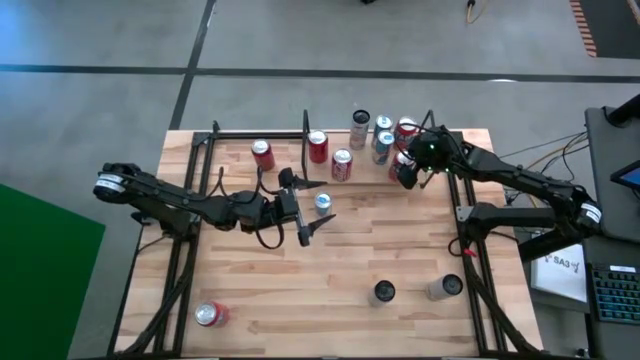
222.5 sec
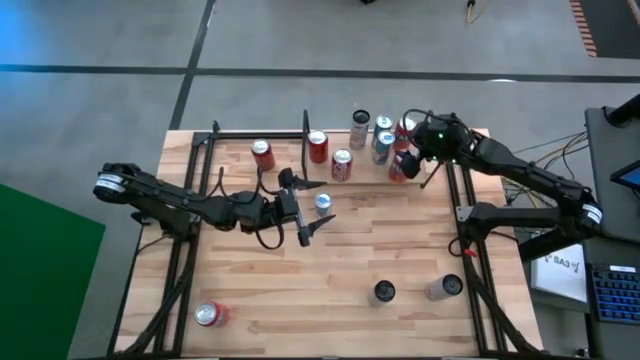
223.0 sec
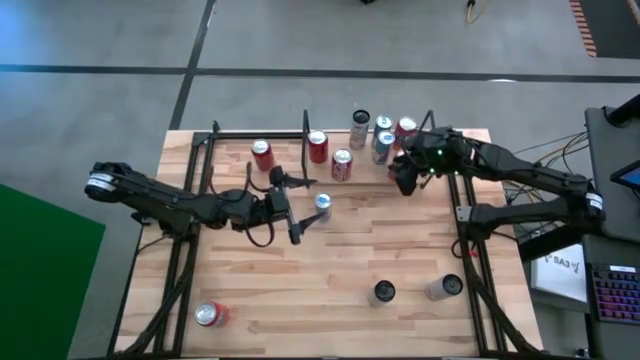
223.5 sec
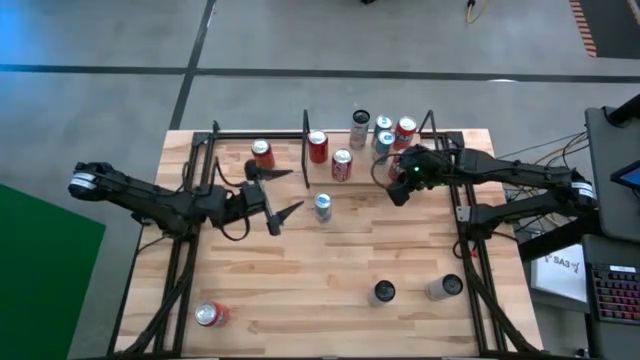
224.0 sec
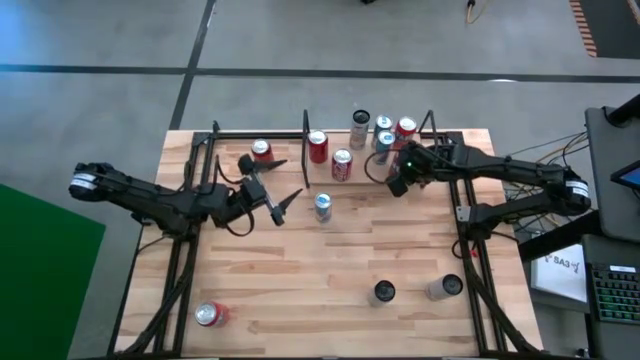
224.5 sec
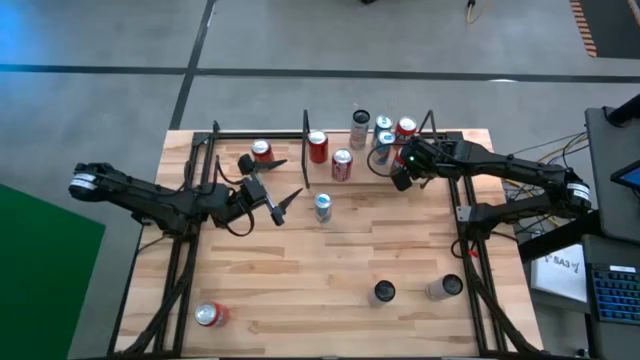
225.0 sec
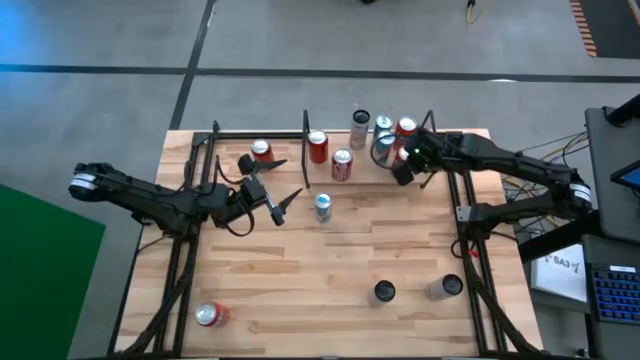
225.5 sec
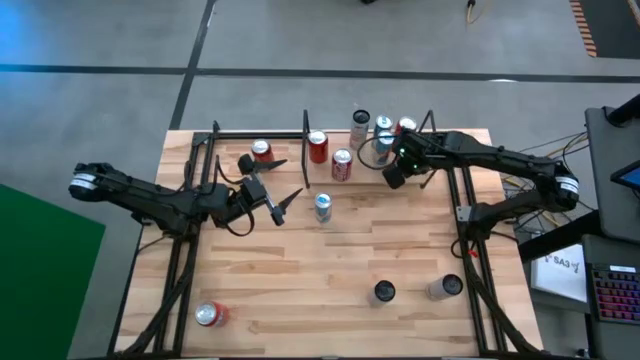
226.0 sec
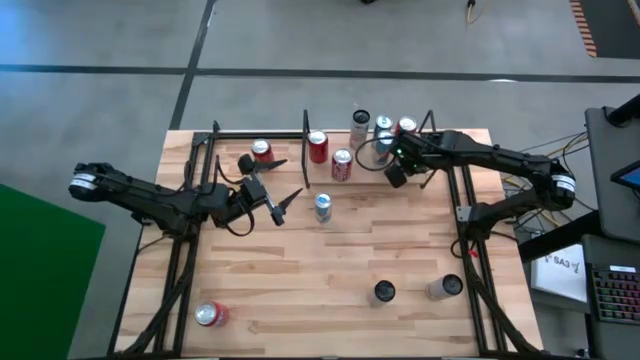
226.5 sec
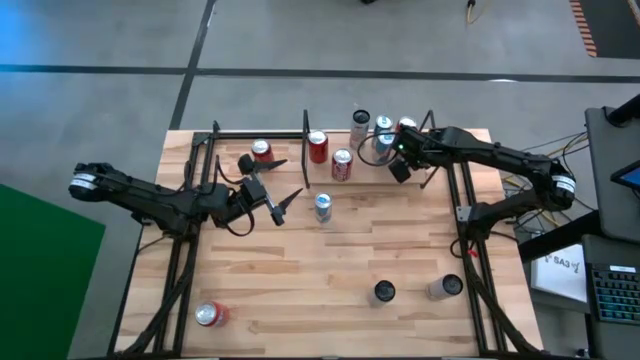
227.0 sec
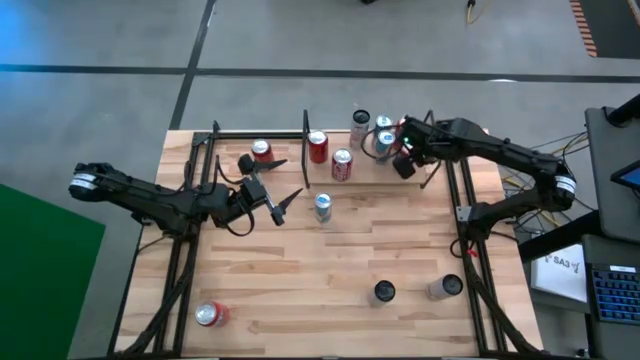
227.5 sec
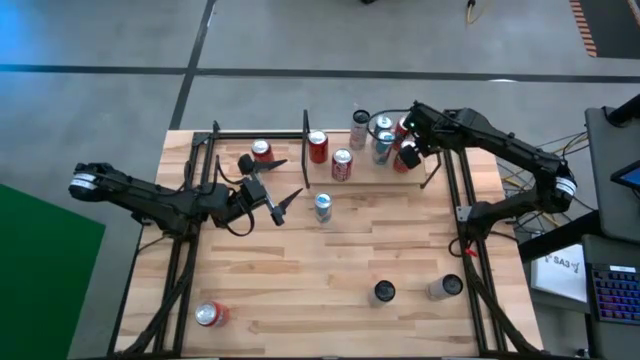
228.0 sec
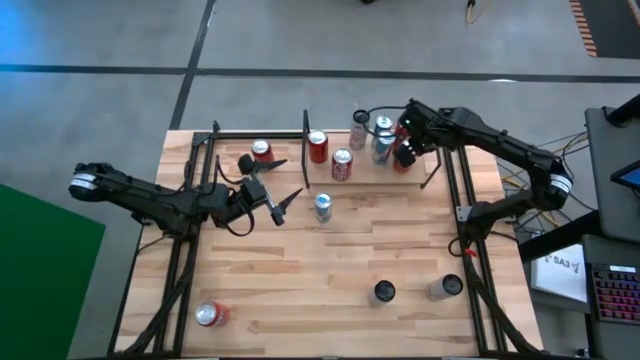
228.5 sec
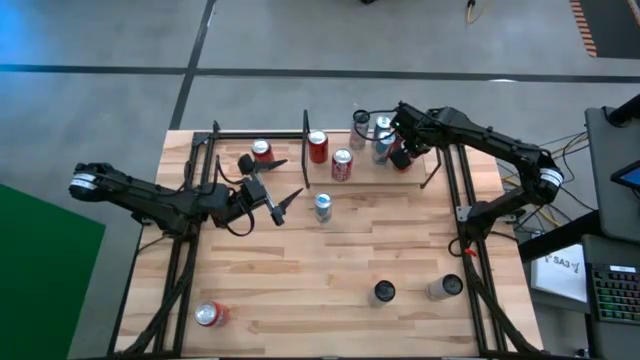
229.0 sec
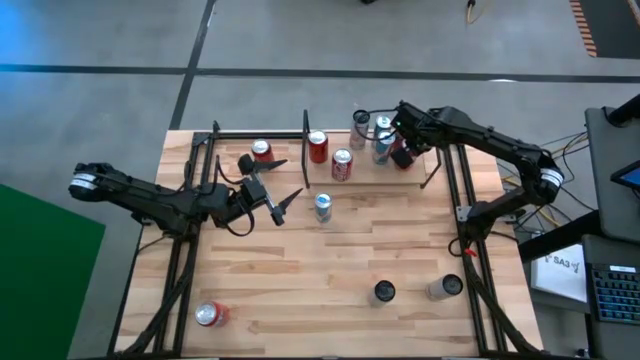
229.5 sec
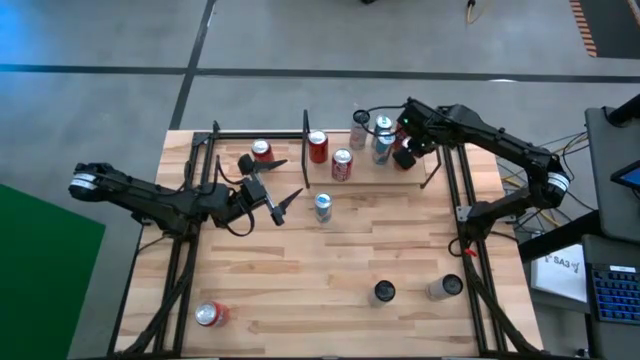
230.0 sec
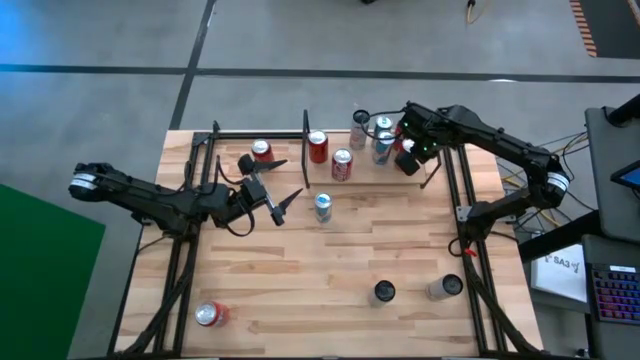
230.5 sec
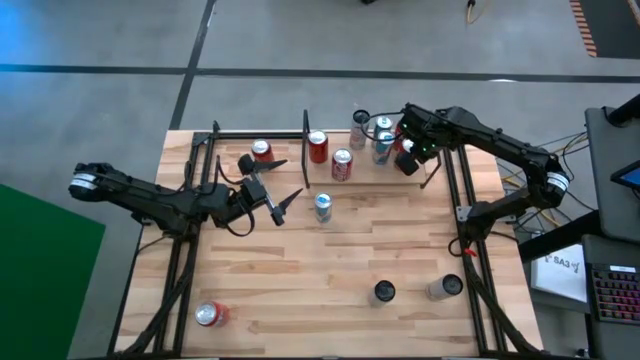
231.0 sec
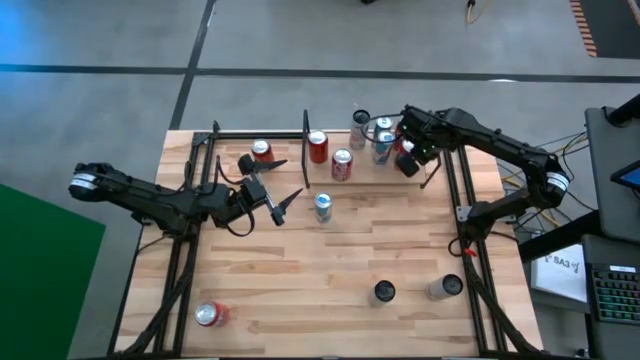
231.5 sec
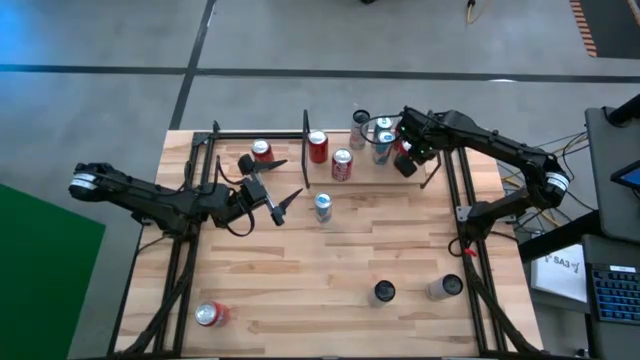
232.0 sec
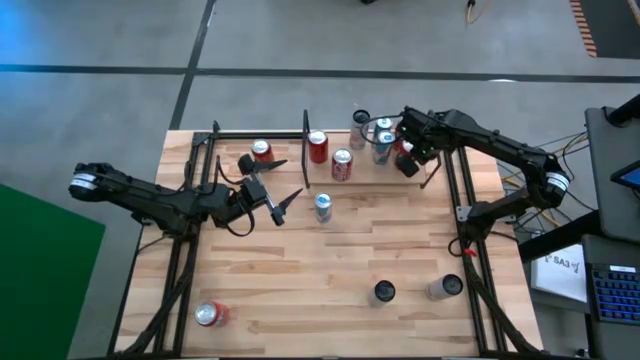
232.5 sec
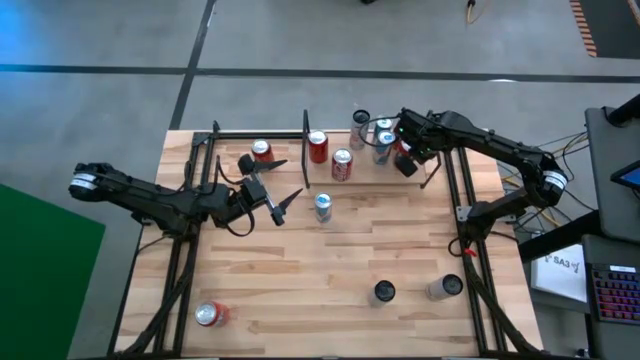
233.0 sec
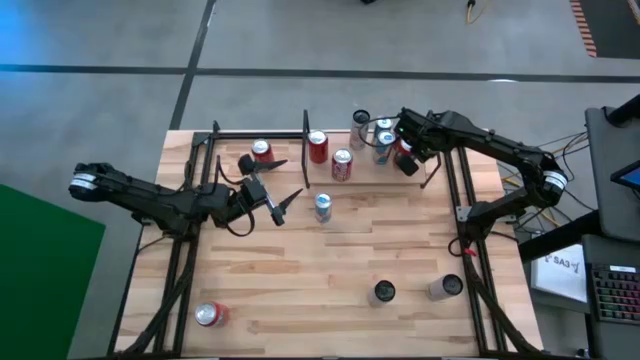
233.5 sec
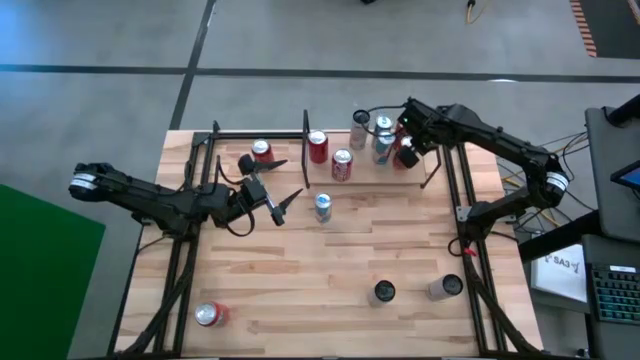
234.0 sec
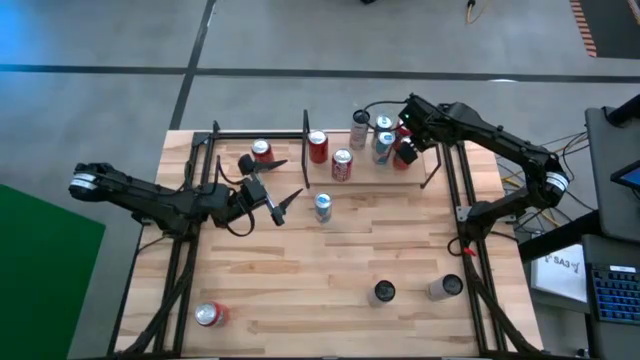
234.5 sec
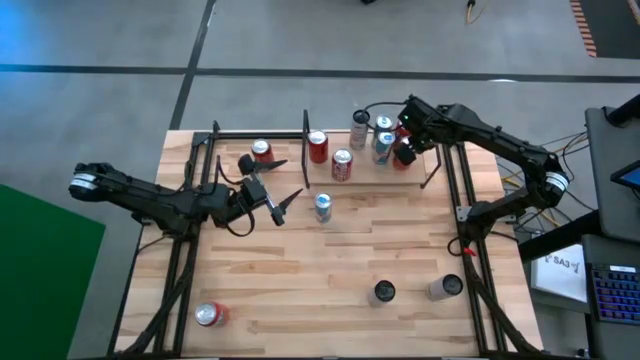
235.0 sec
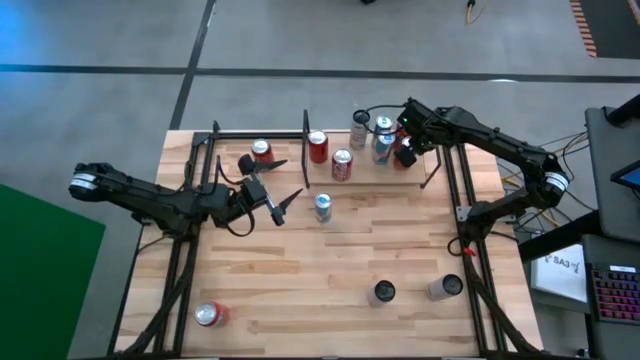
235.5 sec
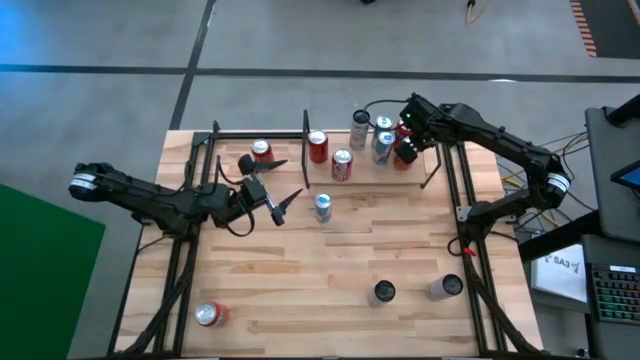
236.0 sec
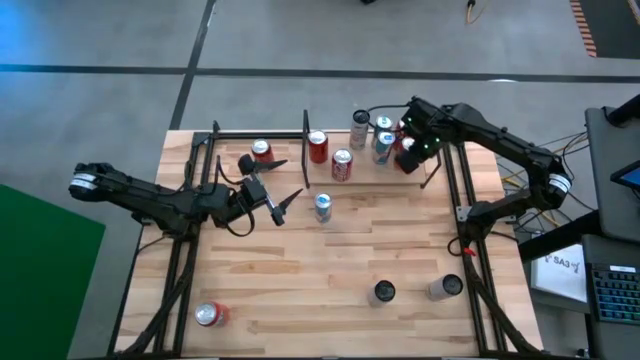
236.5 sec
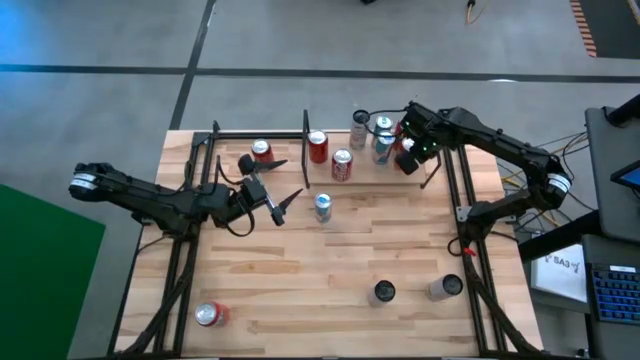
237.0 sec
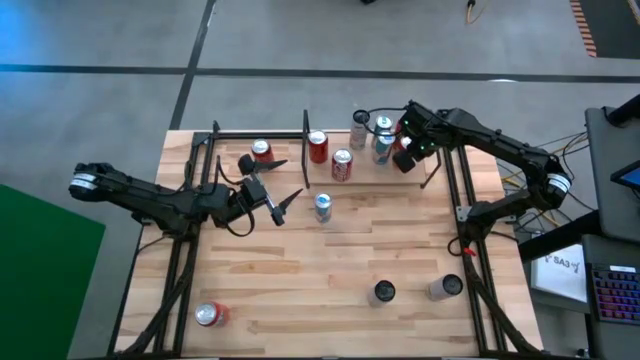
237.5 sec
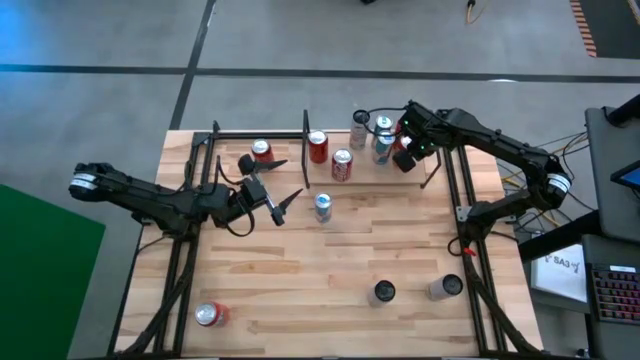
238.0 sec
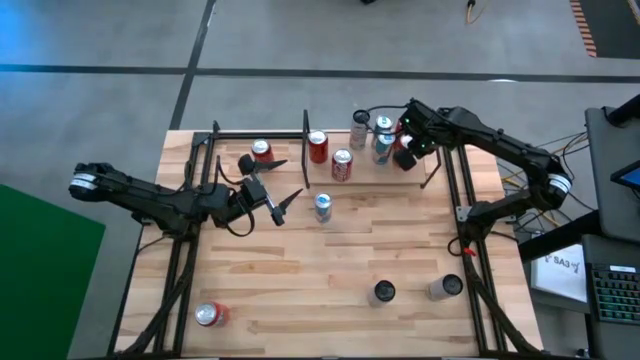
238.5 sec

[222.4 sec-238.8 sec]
Task: Place canned beverage on shelf
Put the red soda can on the shelf

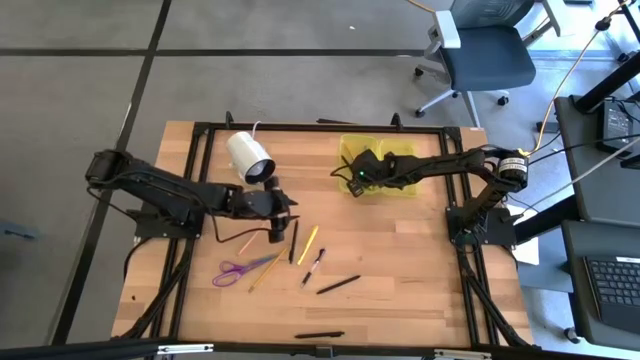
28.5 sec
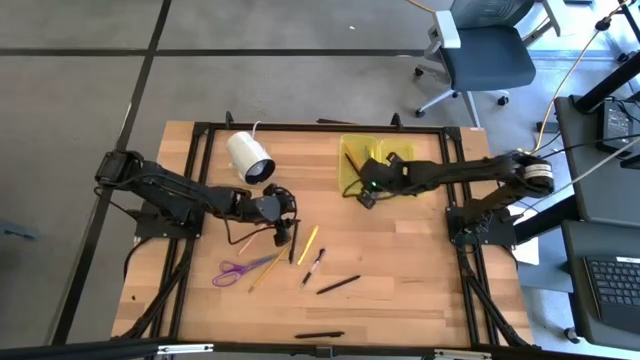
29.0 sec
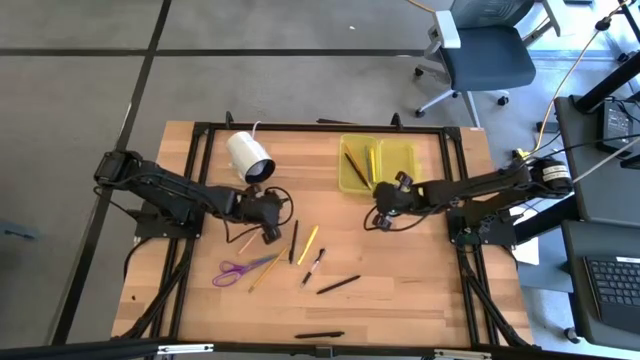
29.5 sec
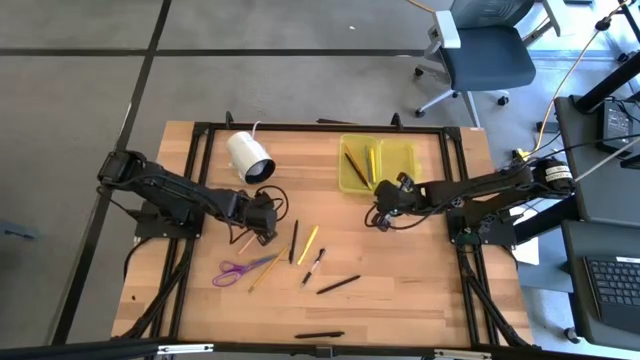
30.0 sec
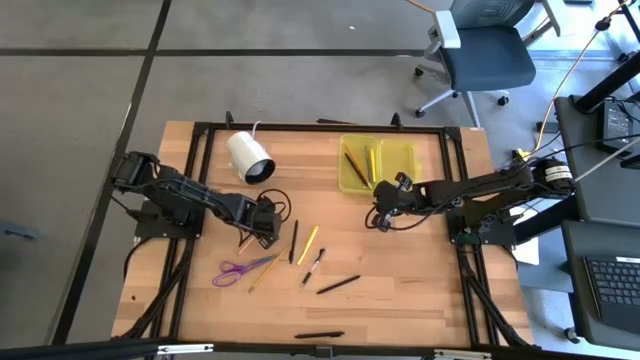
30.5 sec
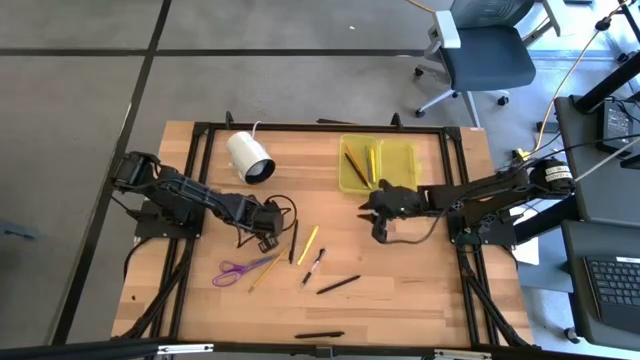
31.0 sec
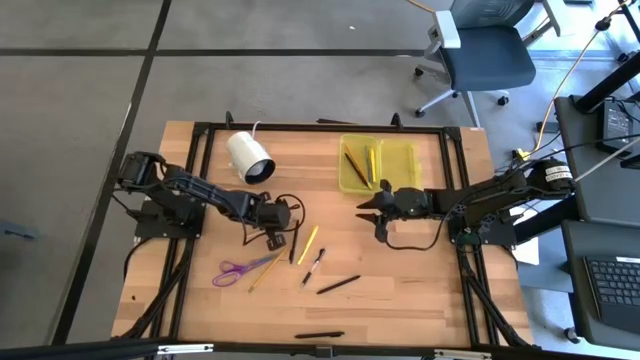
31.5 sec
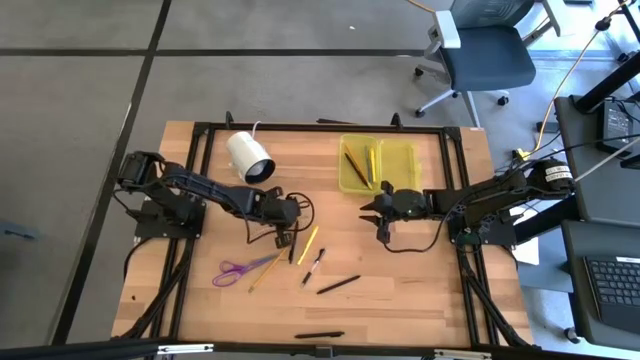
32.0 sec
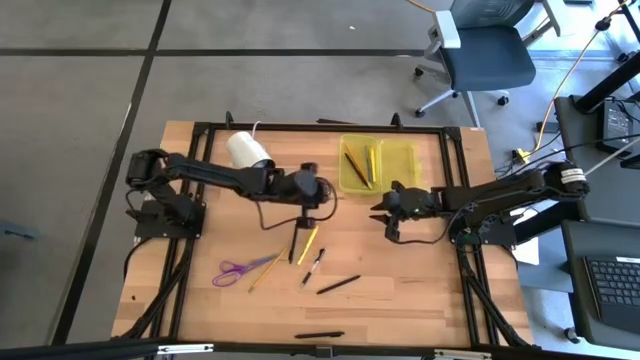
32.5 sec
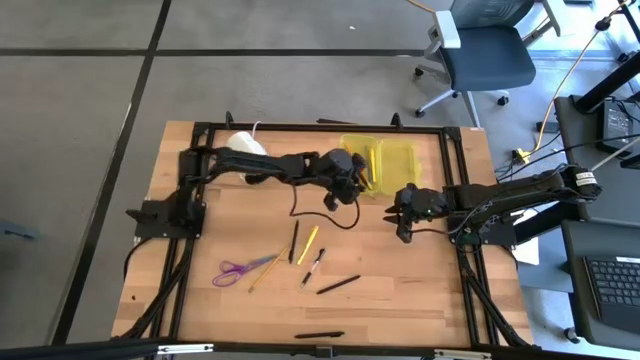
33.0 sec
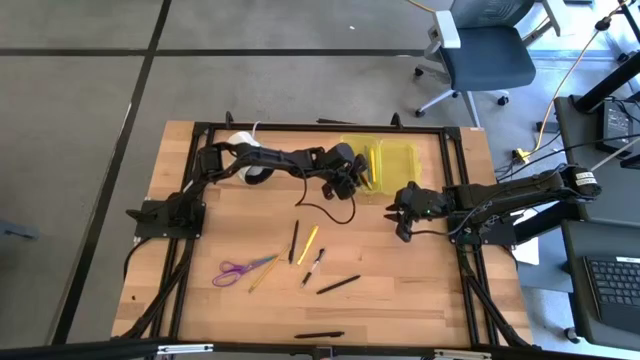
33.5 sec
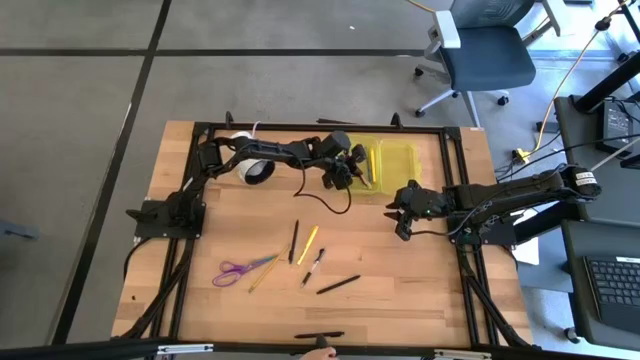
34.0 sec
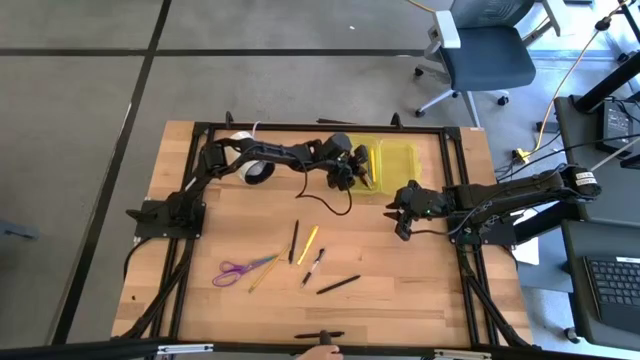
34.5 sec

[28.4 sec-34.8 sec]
Task: Pick & place school supplies into a supply box
Put the pink pencil into the yellow supply box
